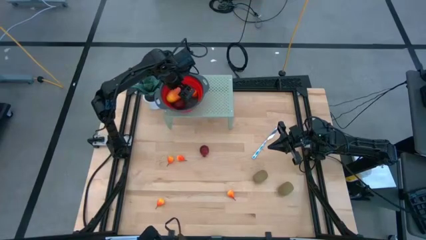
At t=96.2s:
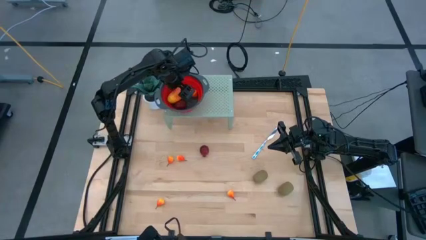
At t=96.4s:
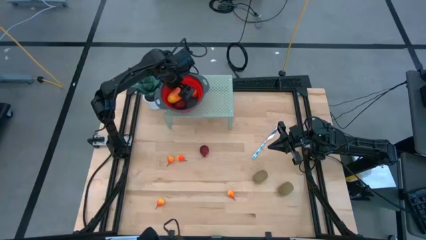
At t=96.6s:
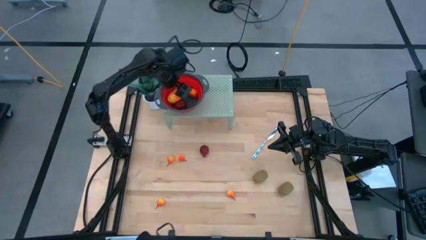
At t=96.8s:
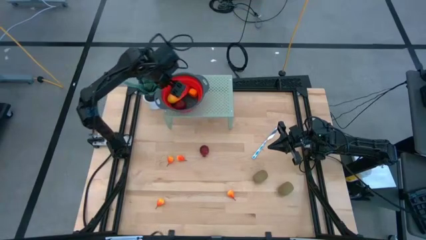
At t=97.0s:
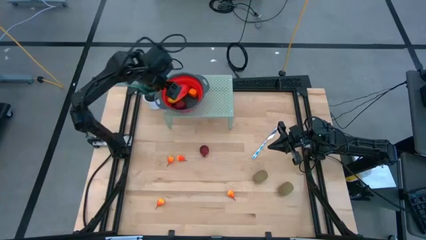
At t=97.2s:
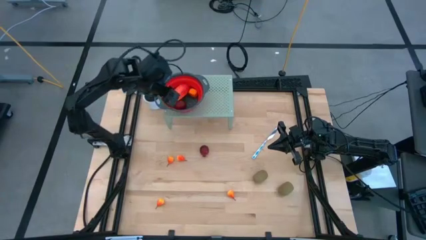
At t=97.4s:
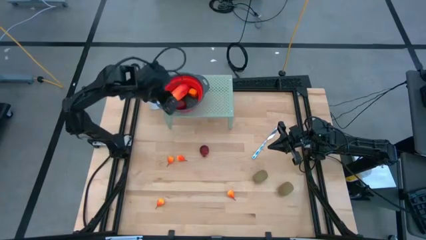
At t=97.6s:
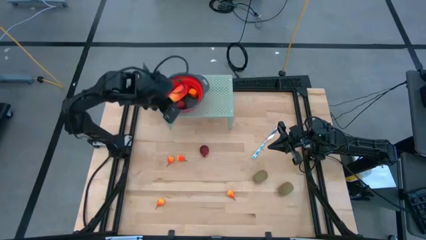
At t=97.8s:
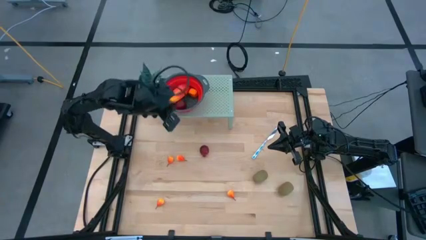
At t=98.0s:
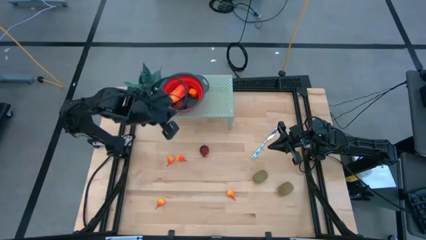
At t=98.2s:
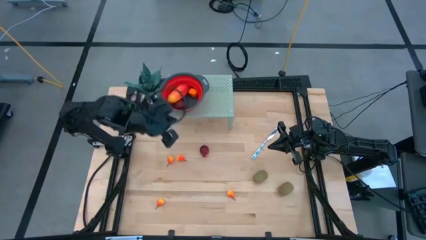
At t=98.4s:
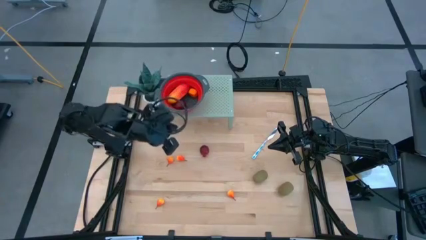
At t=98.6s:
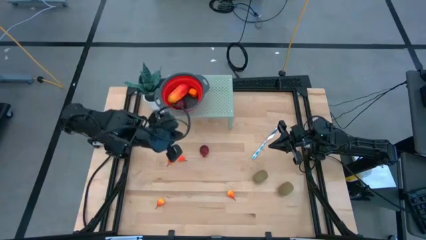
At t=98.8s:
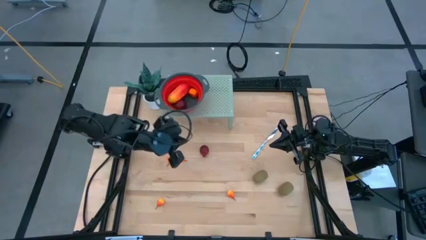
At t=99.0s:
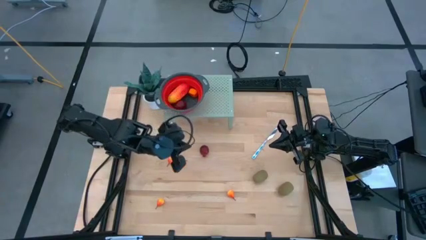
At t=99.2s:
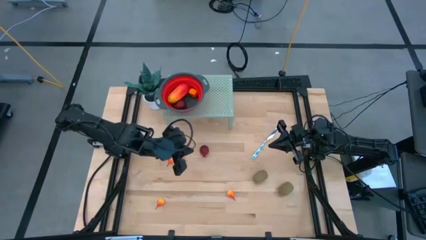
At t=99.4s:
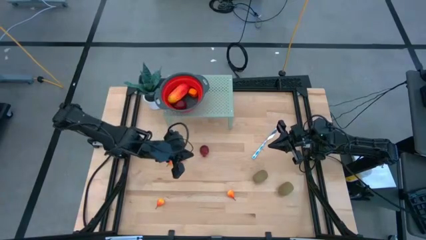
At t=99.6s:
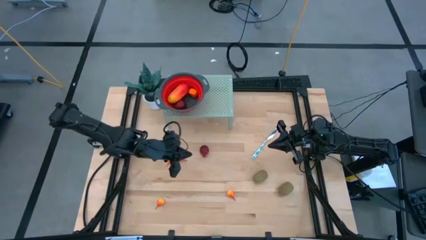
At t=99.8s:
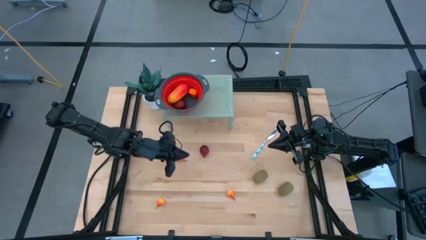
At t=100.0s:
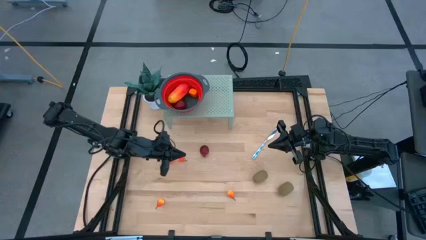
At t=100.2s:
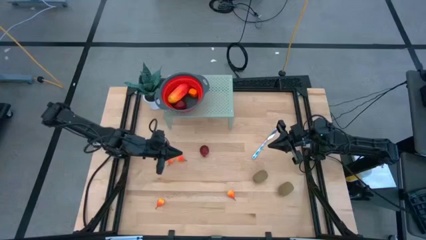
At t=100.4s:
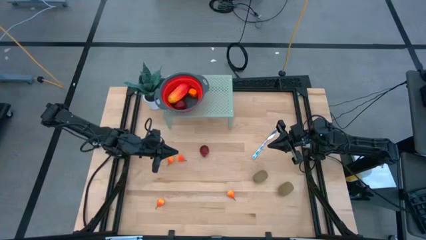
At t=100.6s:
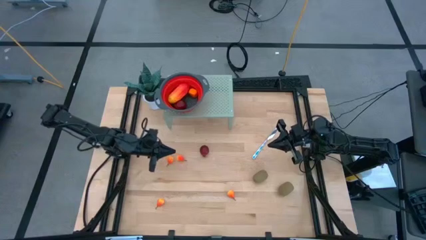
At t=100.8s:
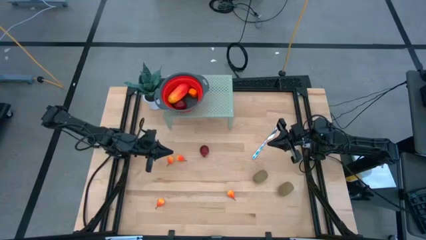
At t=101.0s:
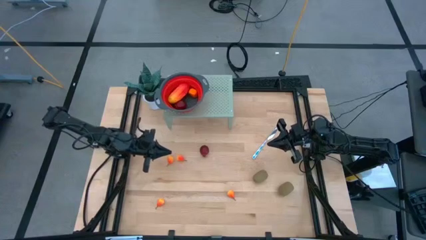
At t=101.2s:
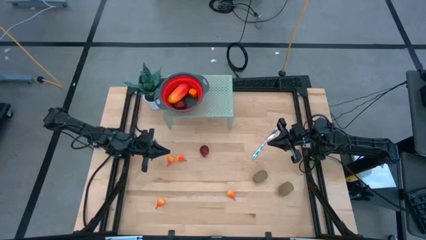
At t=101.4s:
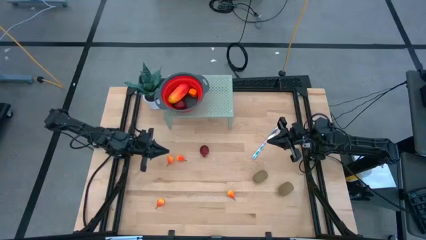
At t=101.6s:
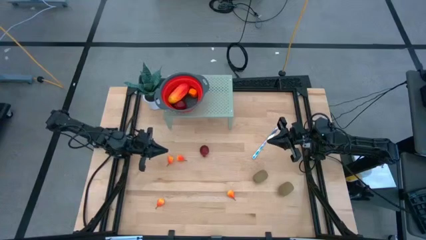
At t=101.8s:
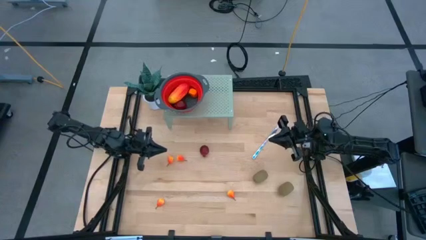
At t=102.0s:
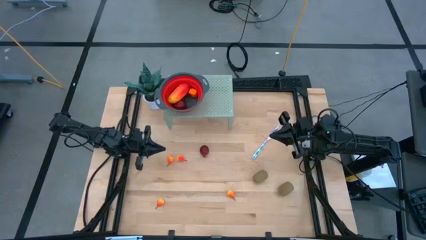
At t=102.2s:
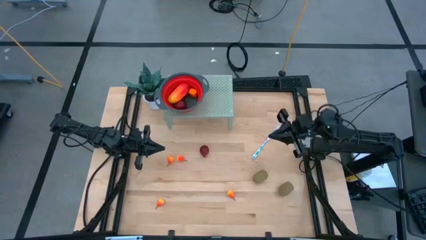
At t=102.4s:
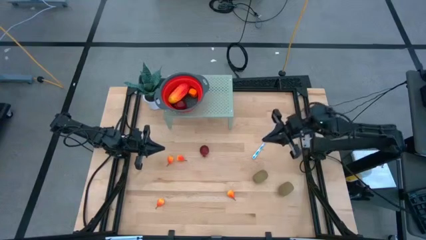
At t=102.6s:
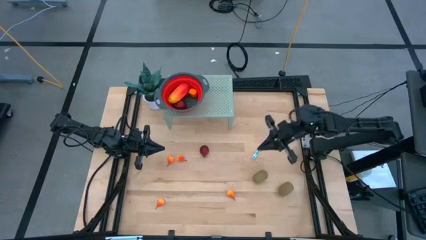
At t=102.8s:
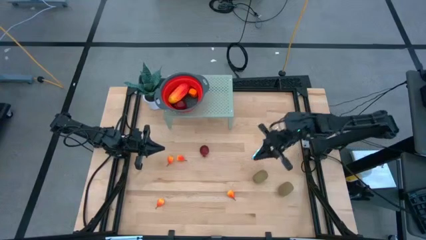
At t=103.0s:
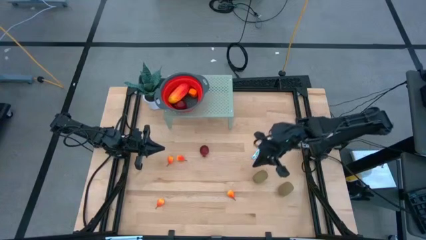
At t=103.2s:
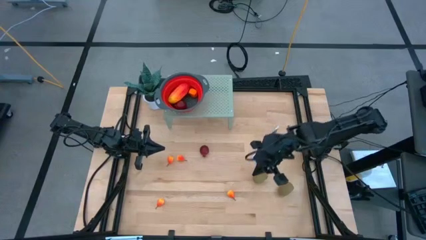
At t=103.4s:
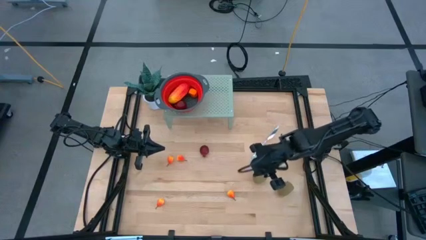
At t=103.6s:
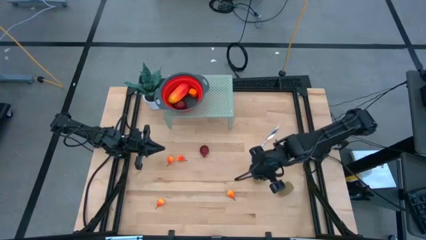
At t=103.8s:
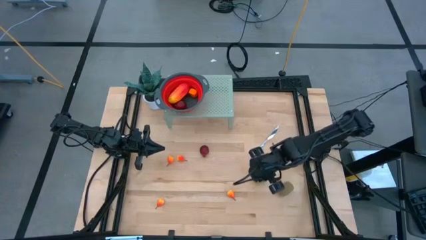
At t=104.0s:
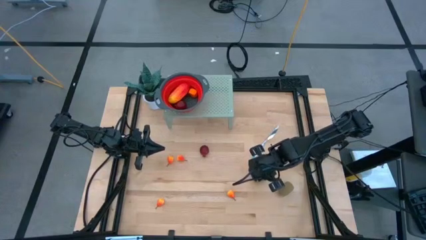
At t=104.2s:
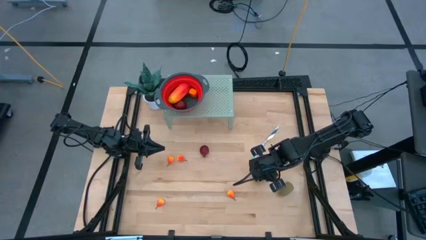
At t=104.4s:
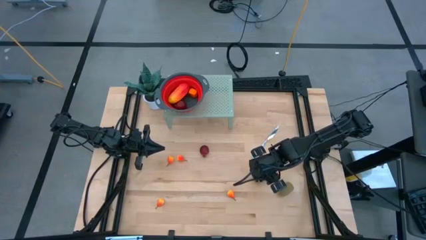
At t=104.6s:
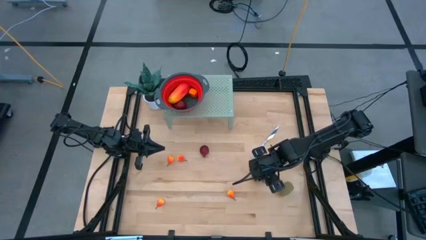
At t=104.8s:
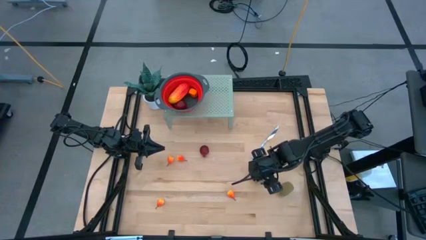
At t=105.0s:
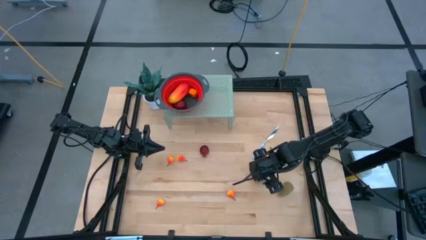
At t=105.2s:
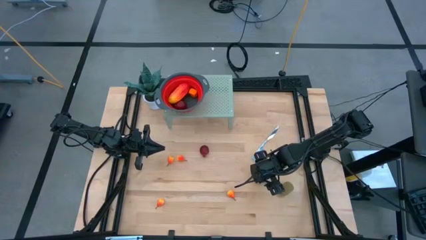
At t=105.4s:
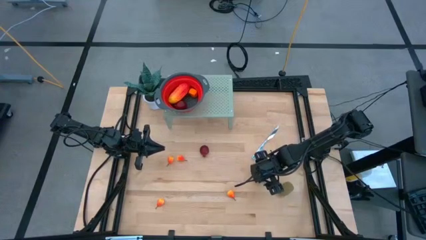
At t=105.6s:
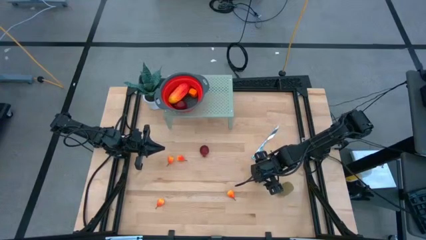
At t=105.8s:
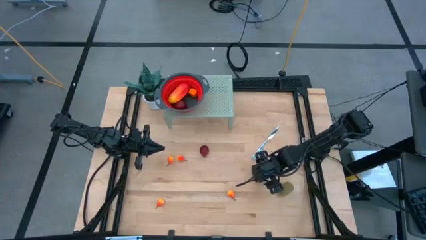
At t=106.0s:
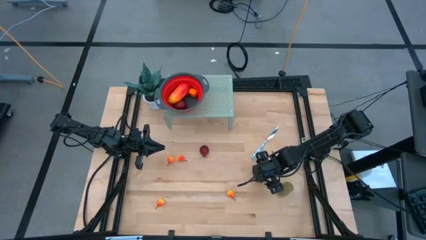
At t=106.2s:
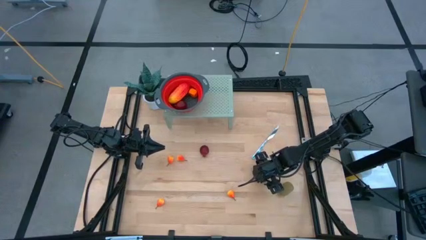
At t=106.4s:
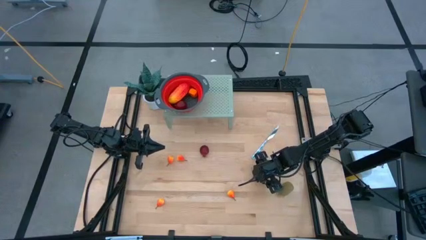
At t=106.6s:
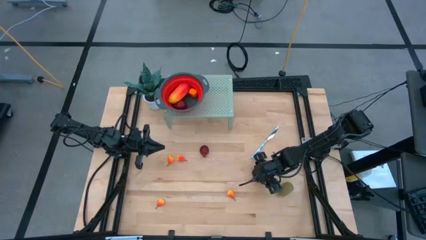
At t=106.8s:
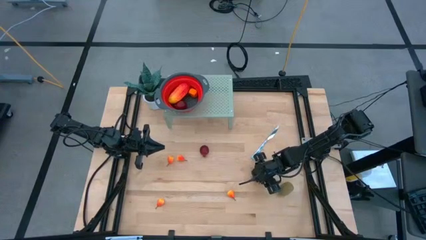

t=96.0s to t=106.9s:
Task: Pick & Place Fruit
Put the kiwi into the red strainer bowl on the shelf
